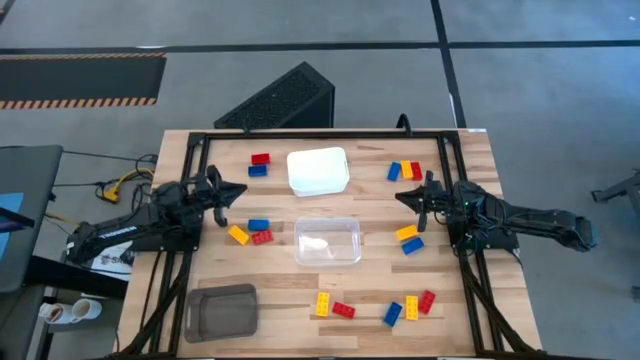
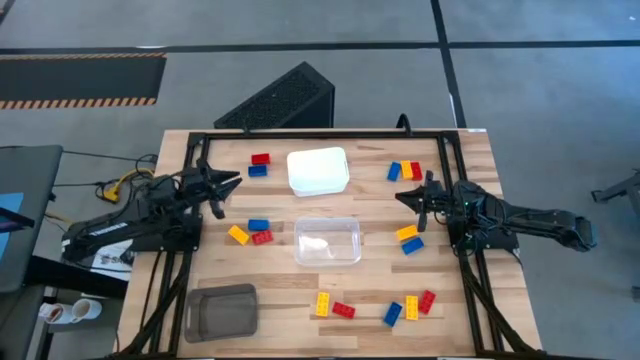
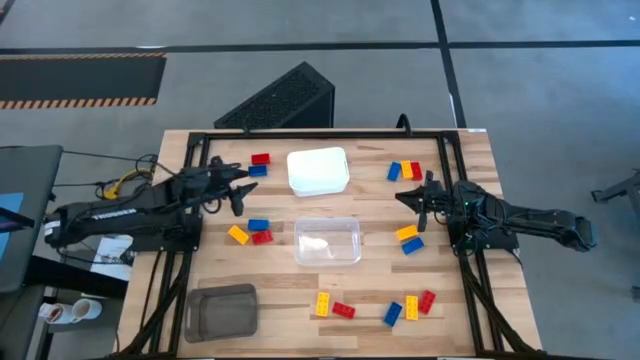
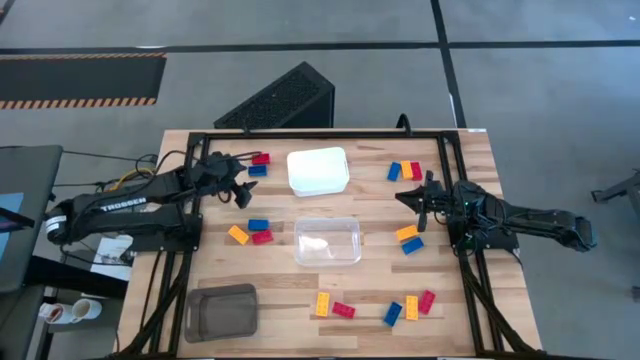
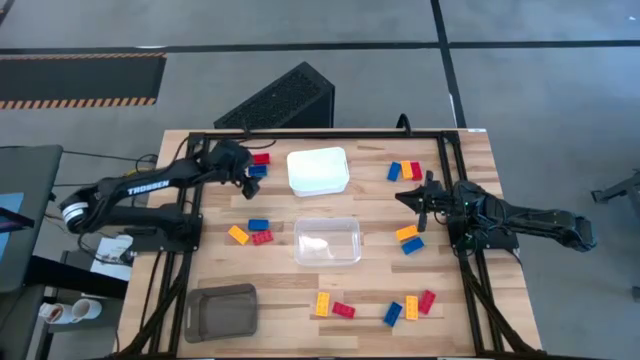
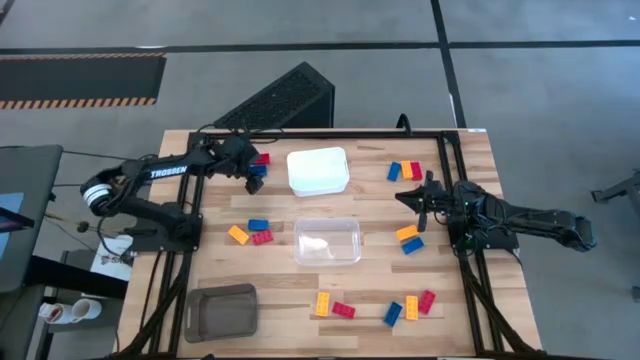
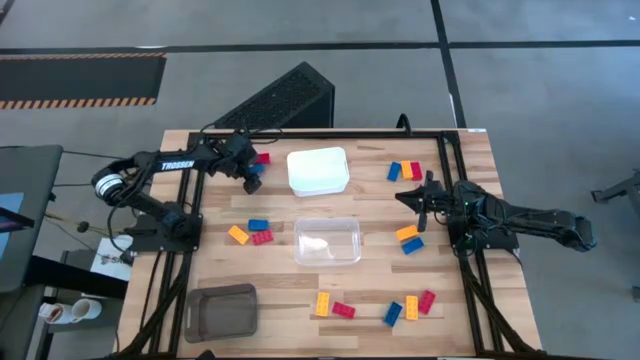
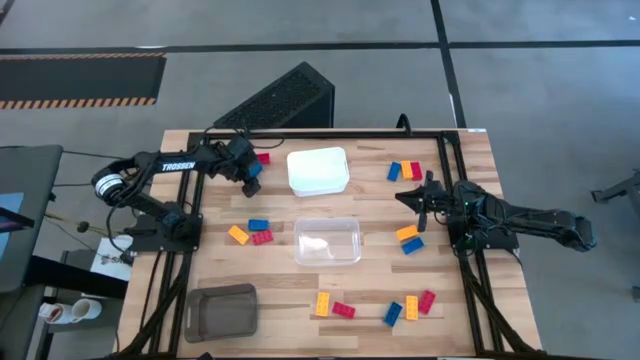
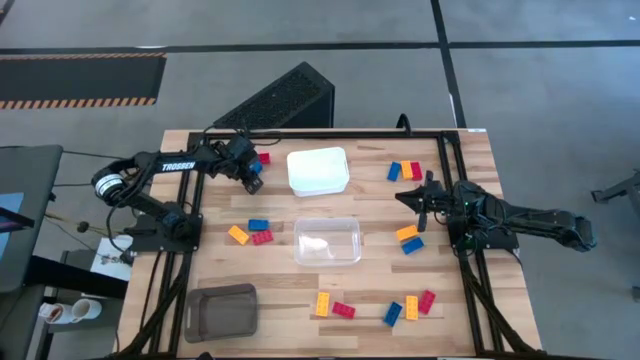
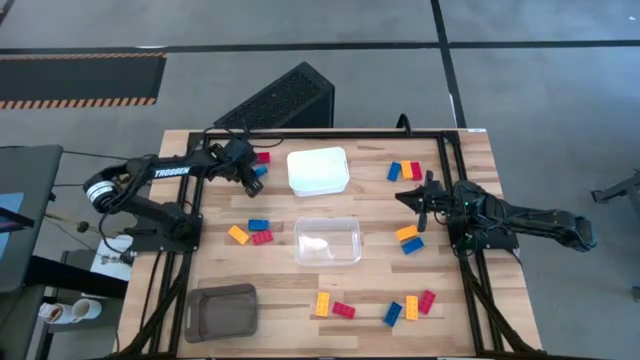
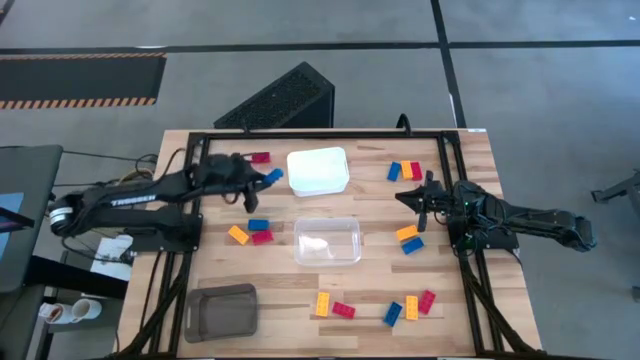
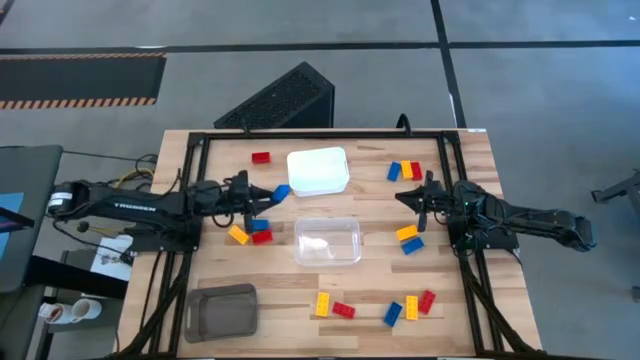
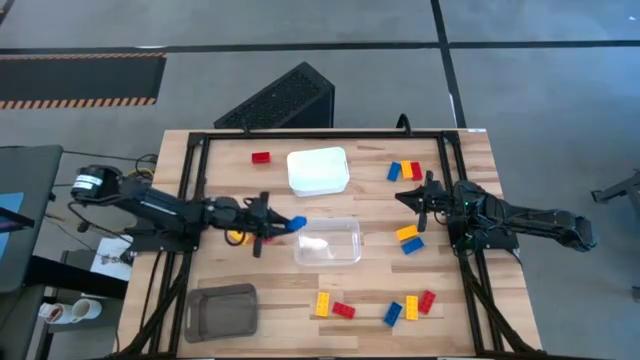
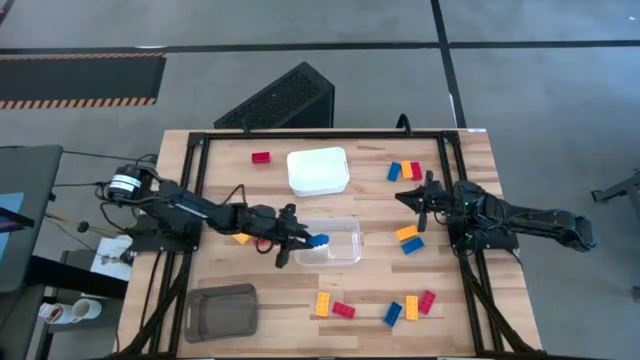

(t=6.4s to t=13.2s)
Task: Sort & place blocks by color
Put the blue game piece into the transparent bin

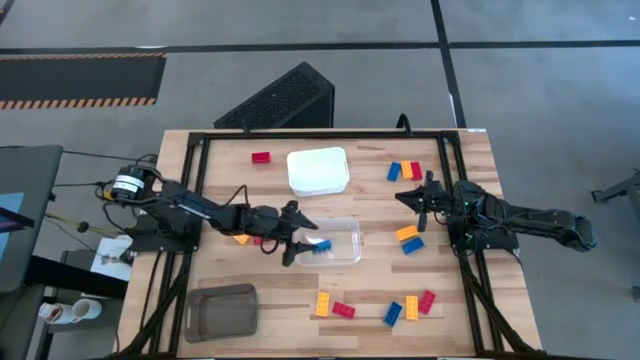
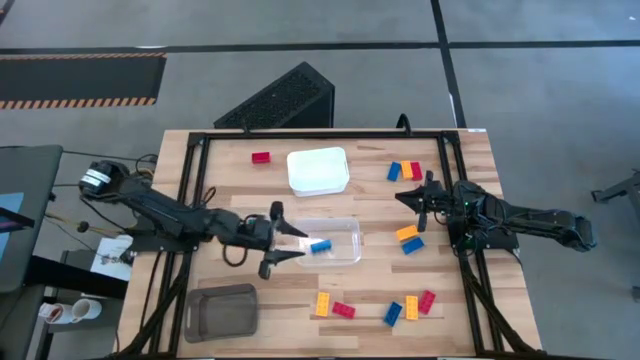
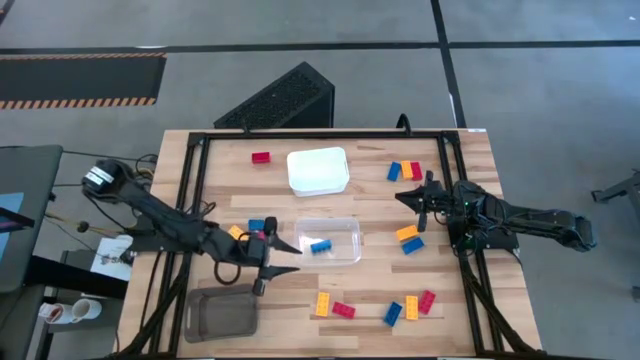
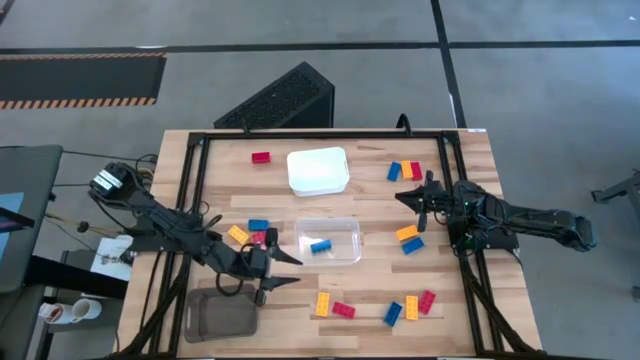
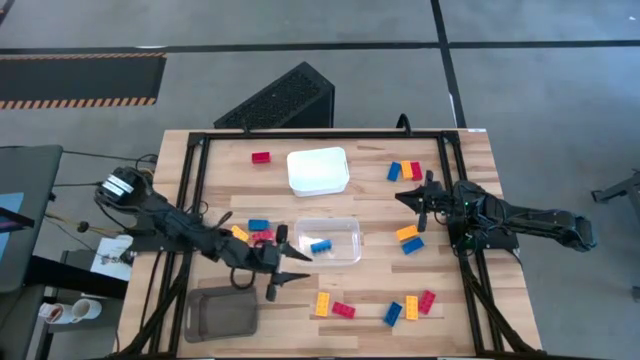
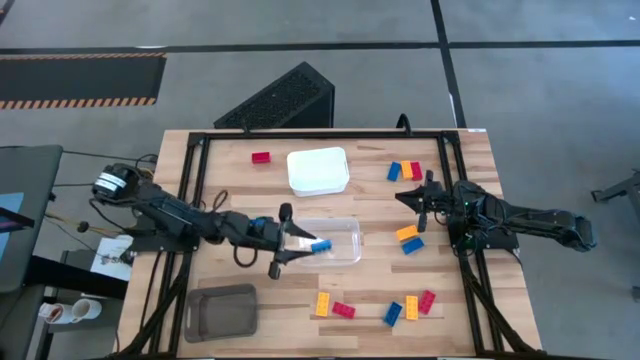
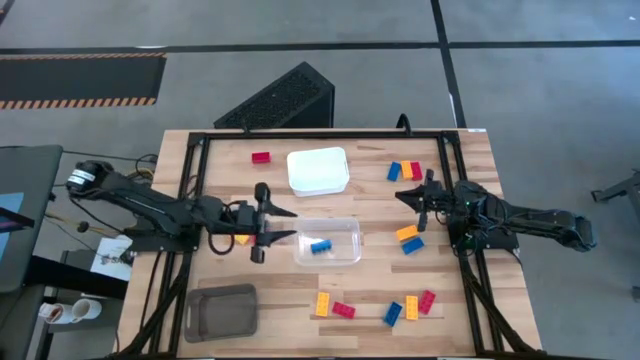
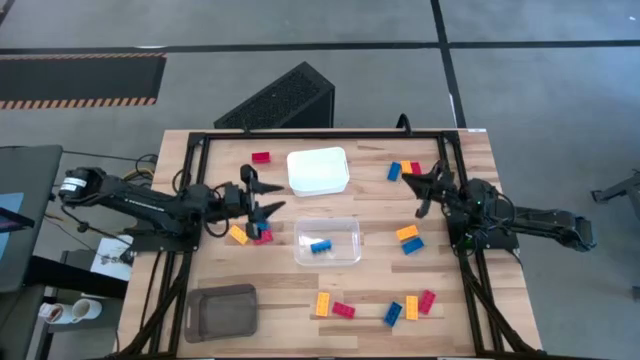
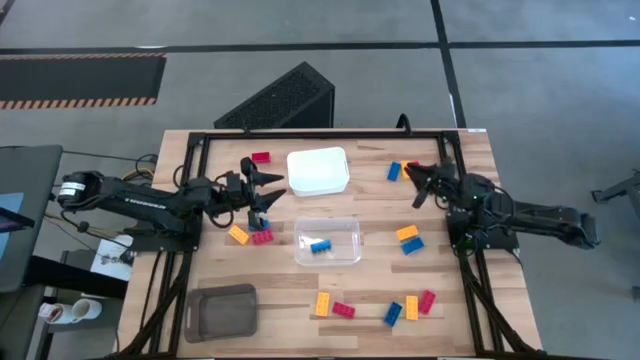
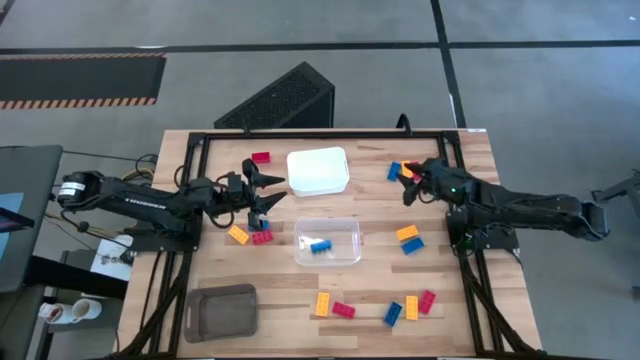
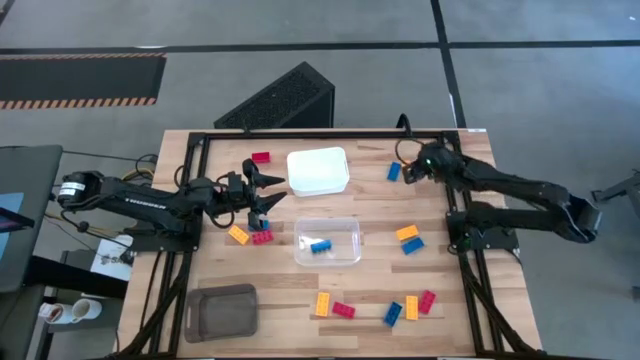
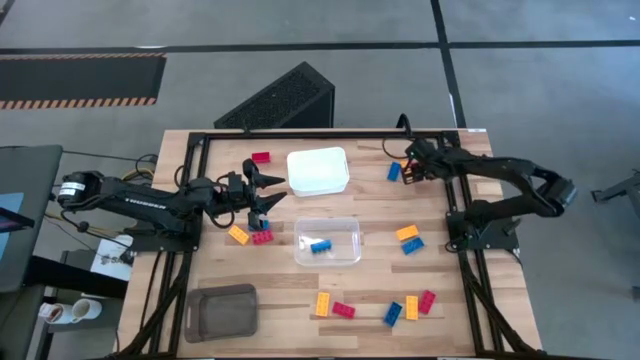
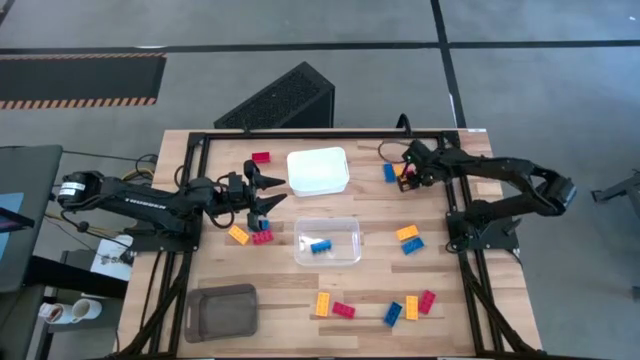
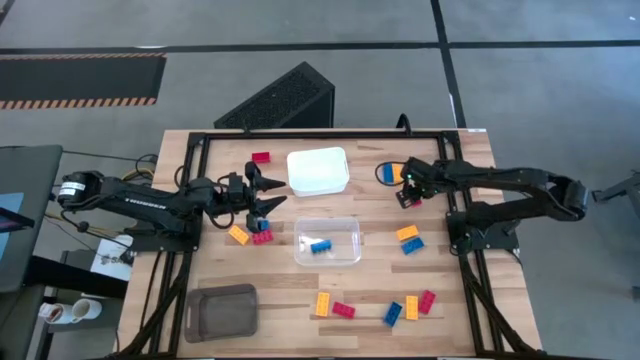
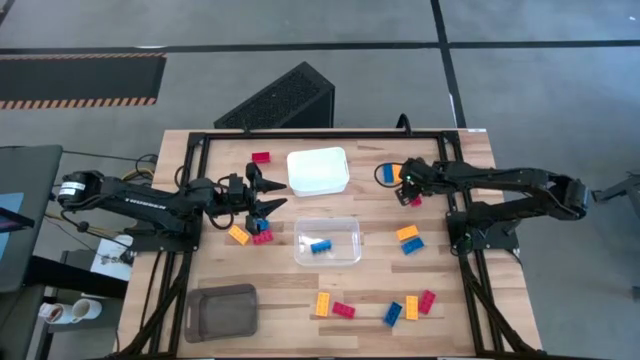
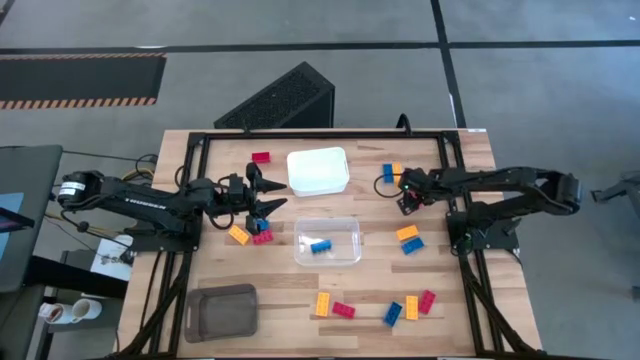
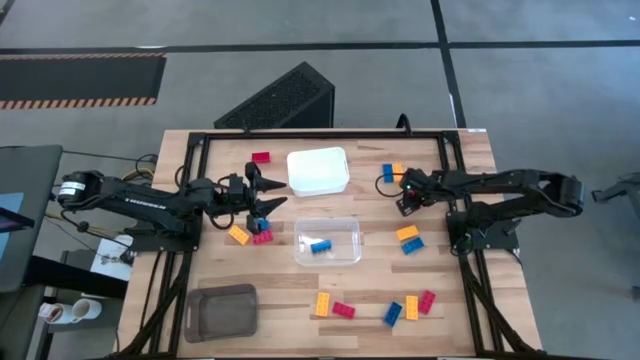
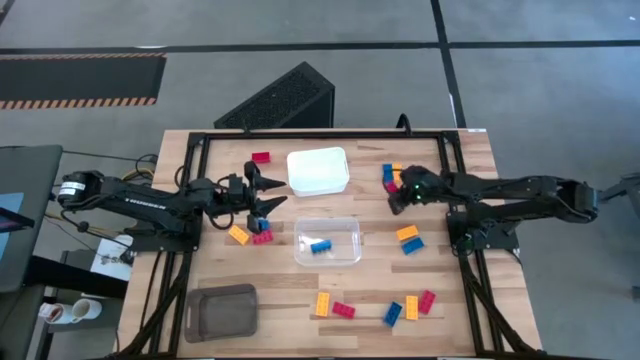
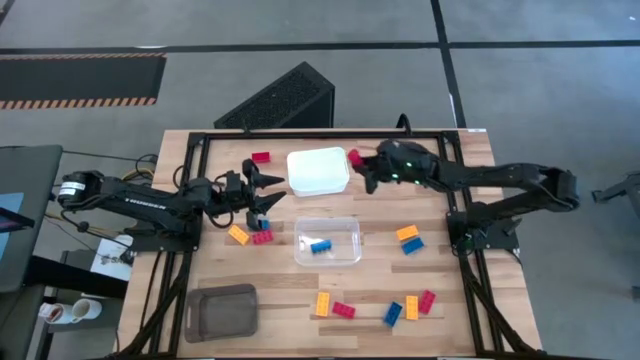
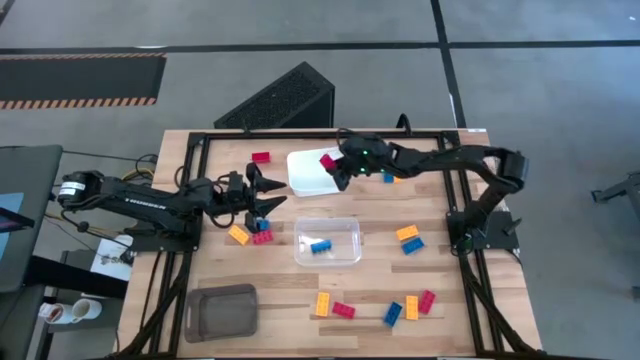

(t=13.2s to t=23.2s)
Put the red game piece into the white bin

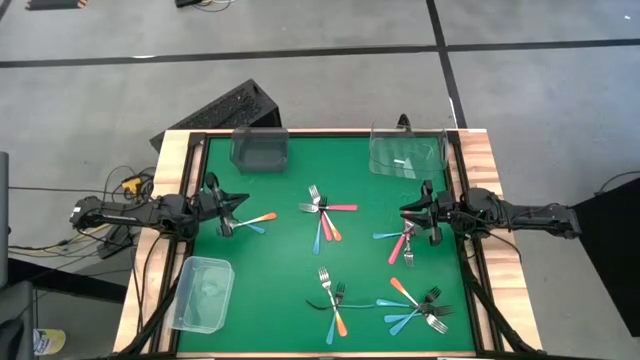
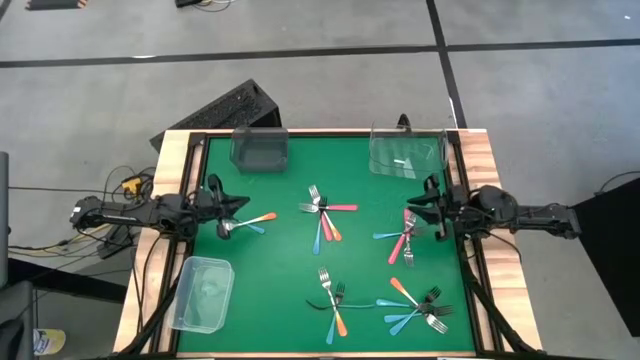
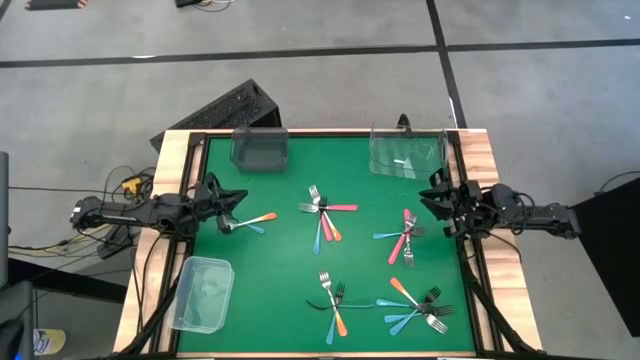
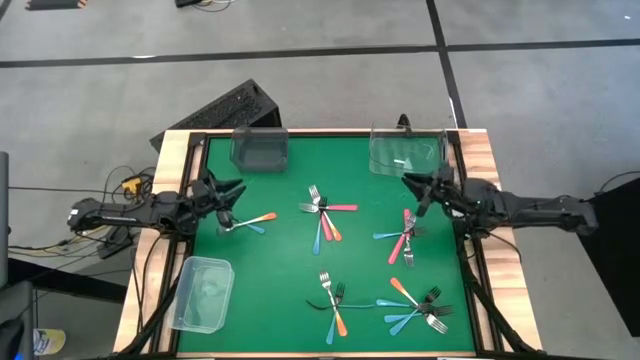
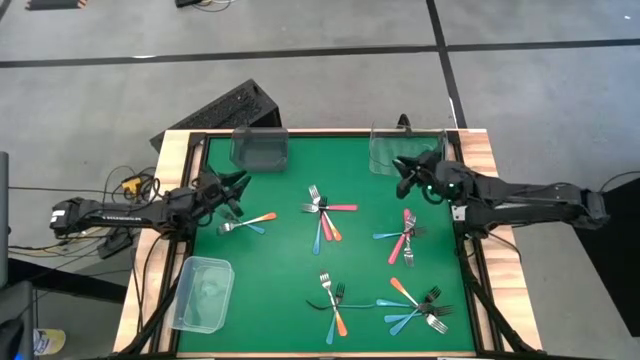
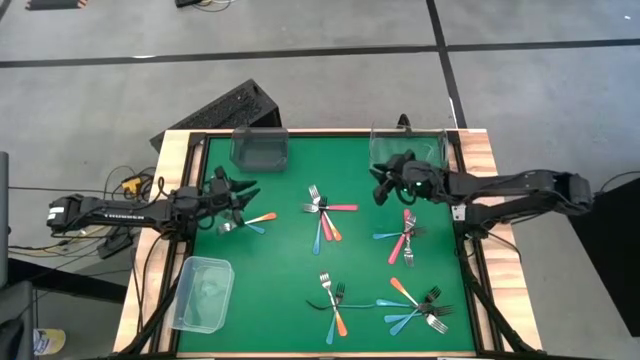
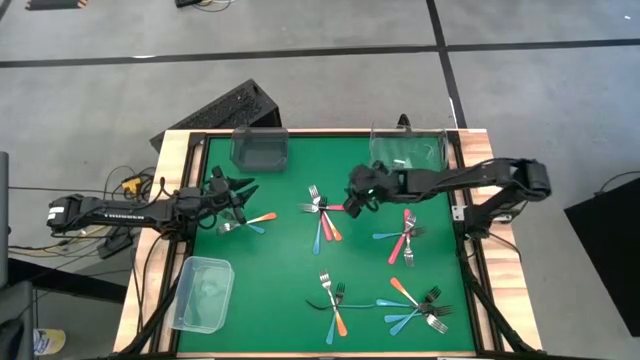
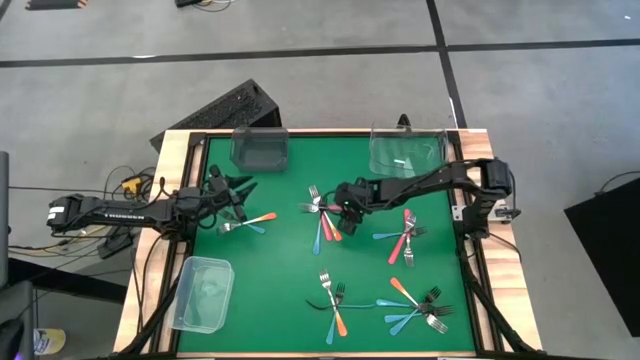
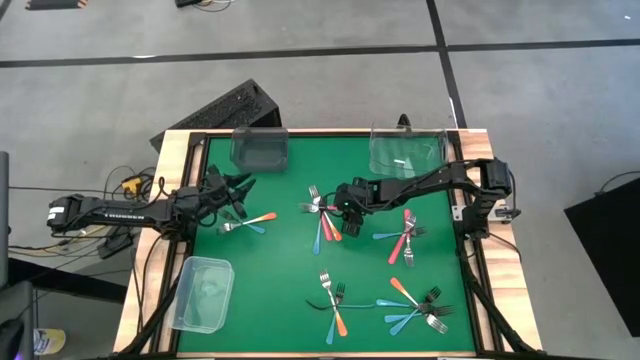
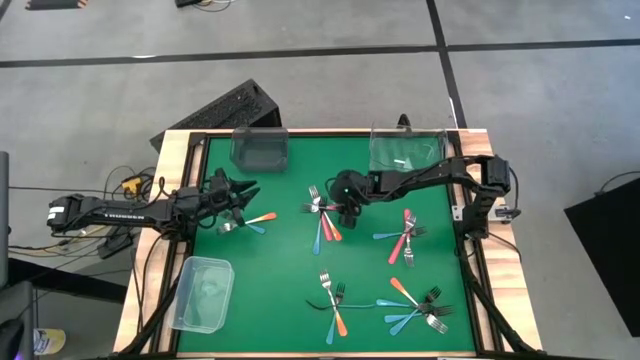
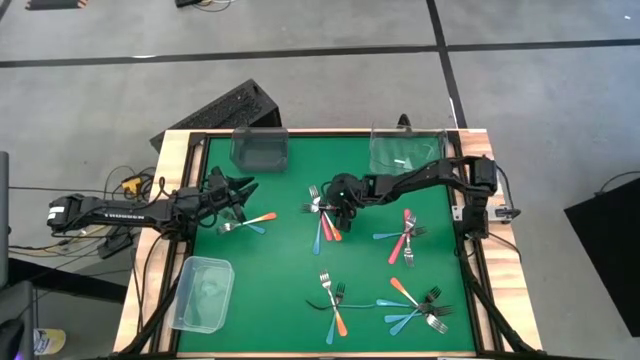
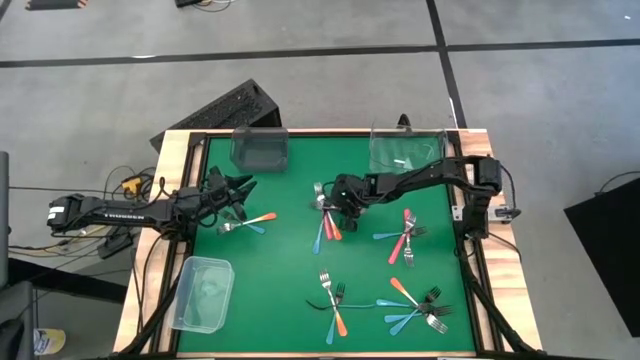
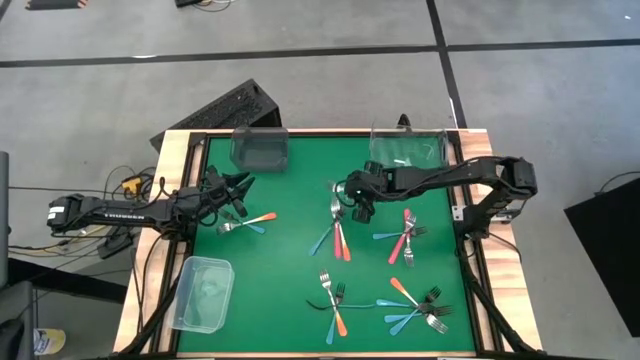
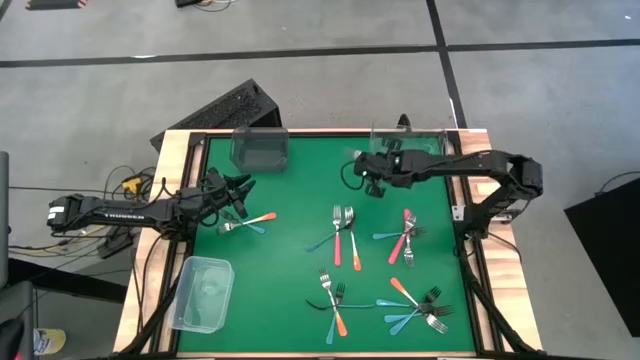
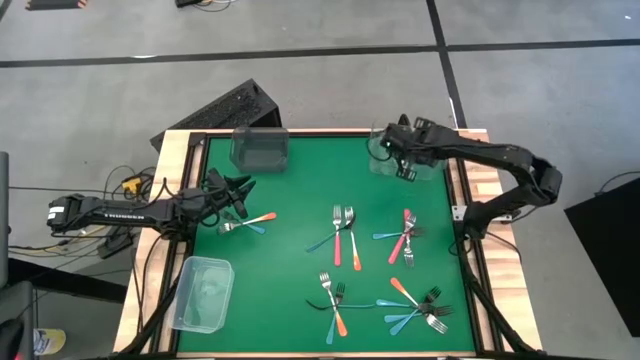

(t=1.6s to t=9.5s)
Task: Sort silverware by color (type)
Put the pink fork into the transparent bin
